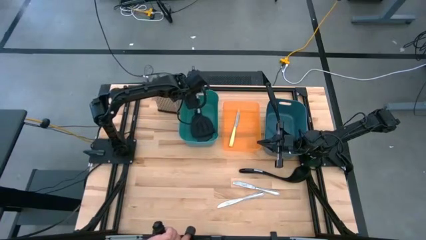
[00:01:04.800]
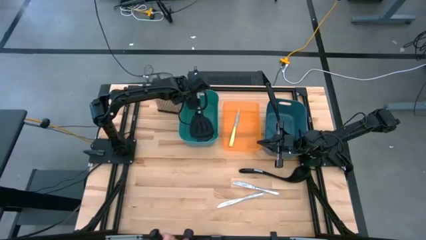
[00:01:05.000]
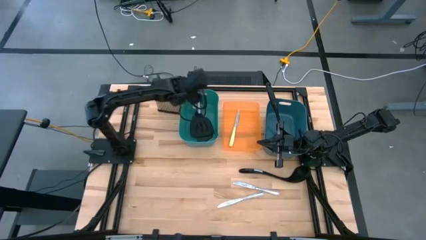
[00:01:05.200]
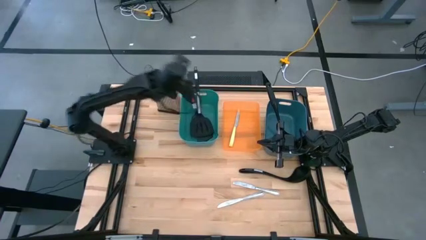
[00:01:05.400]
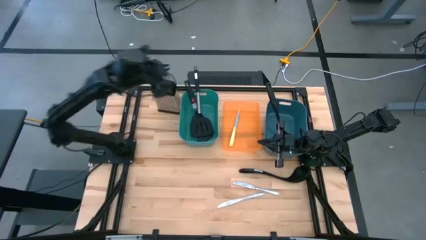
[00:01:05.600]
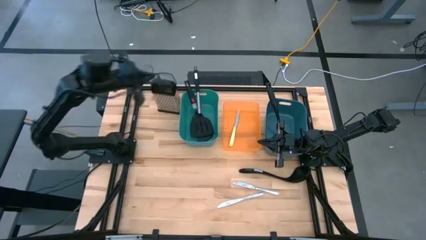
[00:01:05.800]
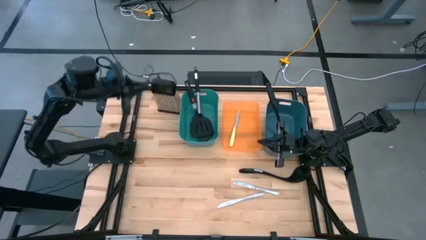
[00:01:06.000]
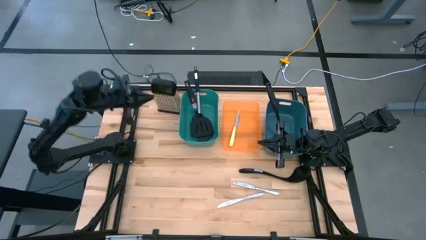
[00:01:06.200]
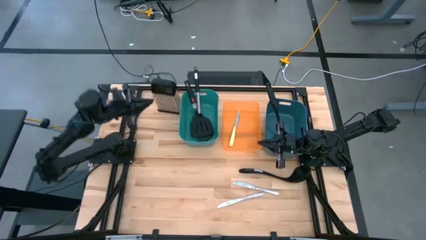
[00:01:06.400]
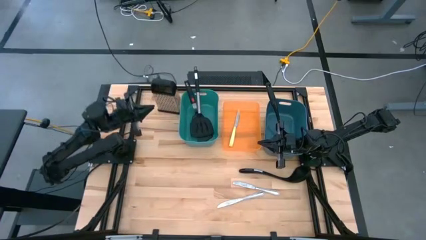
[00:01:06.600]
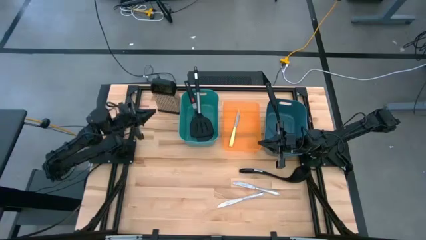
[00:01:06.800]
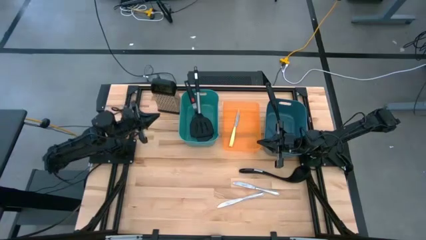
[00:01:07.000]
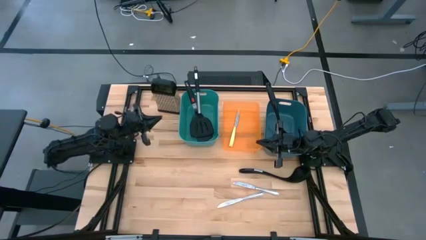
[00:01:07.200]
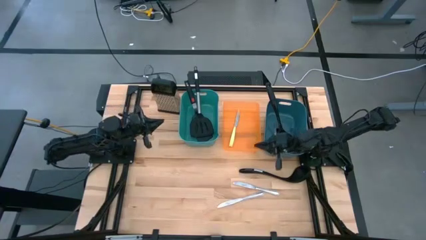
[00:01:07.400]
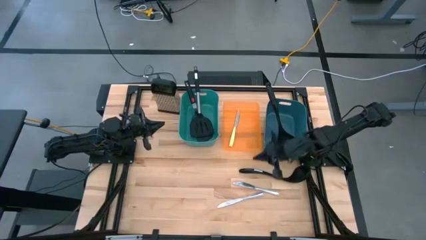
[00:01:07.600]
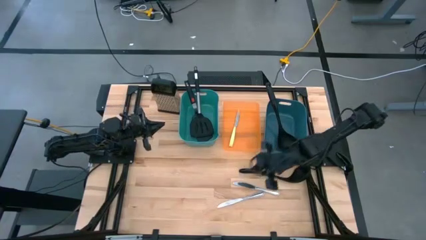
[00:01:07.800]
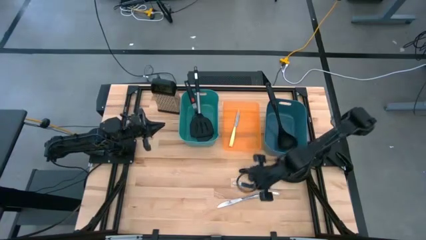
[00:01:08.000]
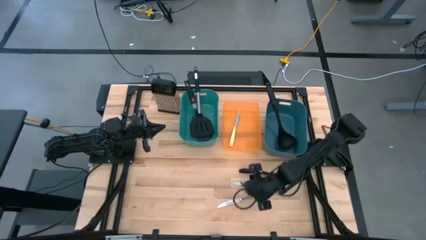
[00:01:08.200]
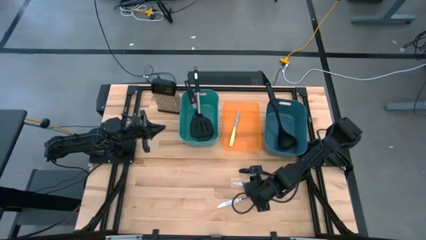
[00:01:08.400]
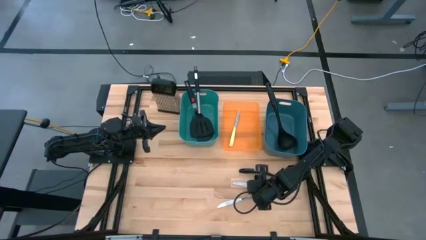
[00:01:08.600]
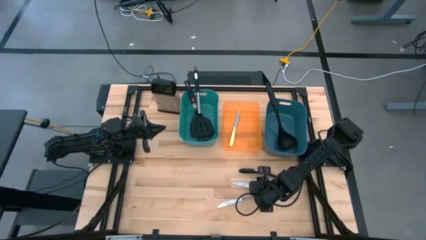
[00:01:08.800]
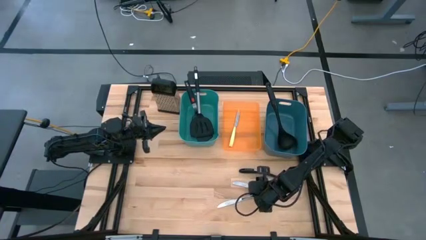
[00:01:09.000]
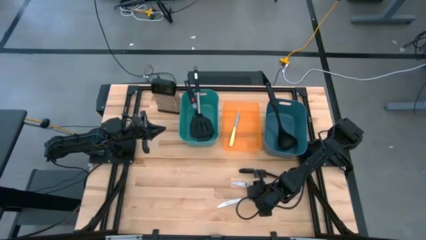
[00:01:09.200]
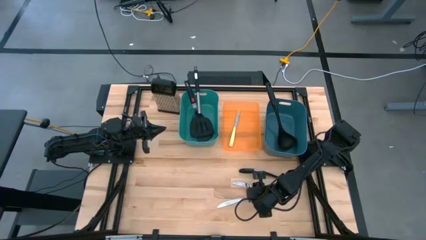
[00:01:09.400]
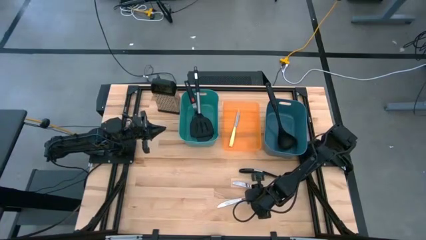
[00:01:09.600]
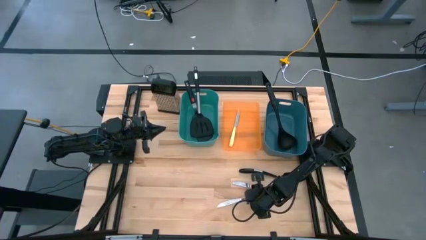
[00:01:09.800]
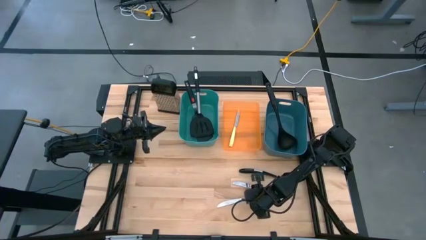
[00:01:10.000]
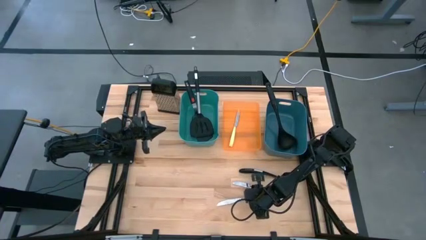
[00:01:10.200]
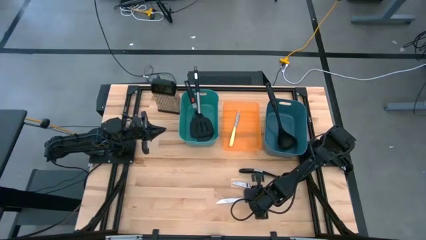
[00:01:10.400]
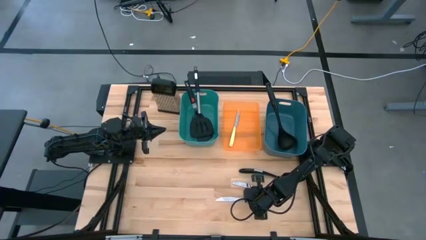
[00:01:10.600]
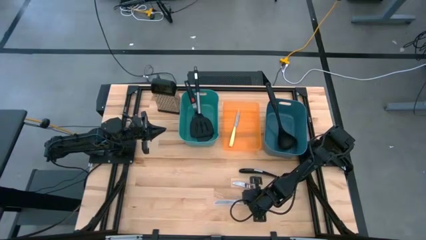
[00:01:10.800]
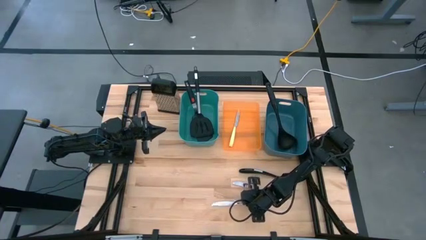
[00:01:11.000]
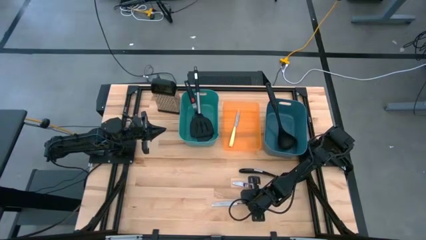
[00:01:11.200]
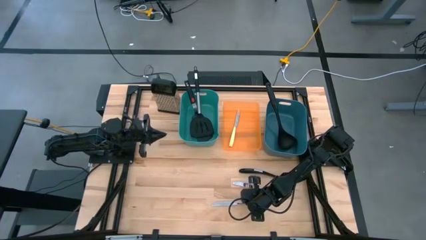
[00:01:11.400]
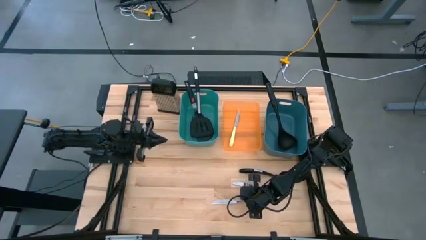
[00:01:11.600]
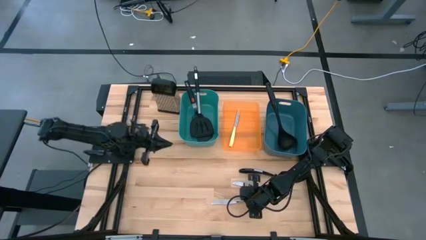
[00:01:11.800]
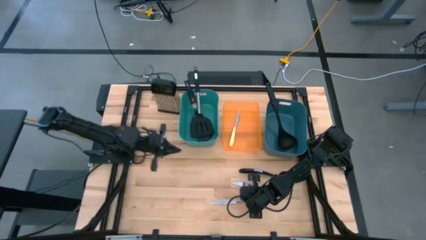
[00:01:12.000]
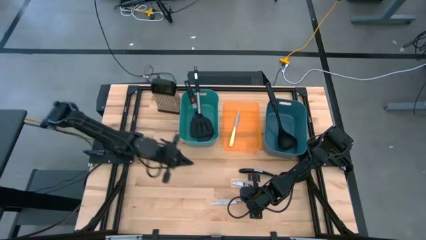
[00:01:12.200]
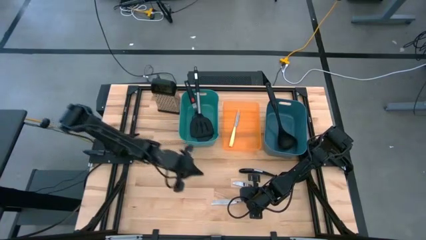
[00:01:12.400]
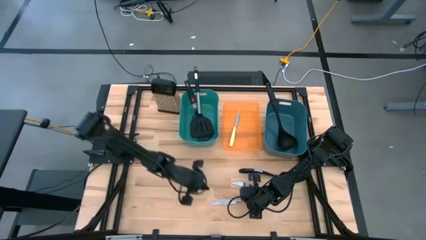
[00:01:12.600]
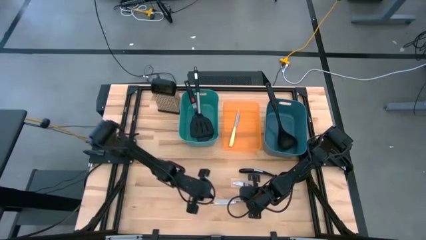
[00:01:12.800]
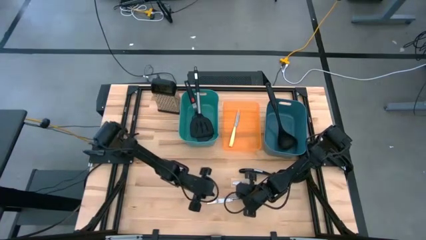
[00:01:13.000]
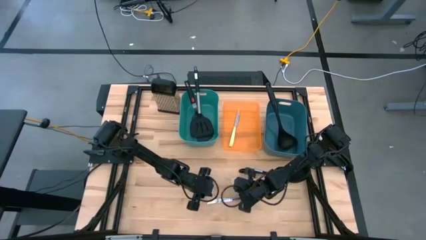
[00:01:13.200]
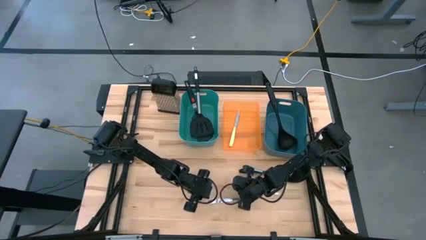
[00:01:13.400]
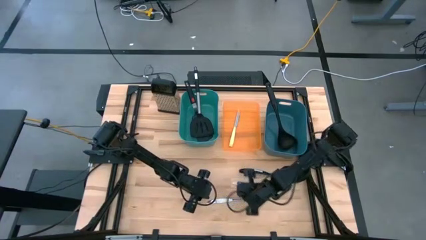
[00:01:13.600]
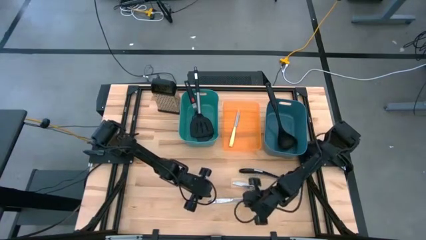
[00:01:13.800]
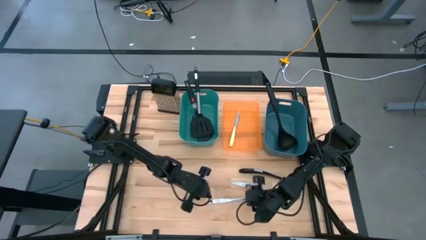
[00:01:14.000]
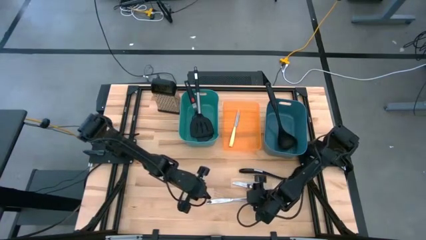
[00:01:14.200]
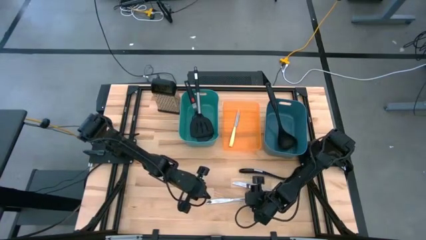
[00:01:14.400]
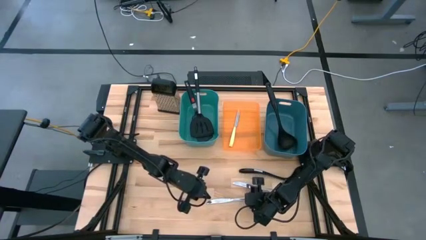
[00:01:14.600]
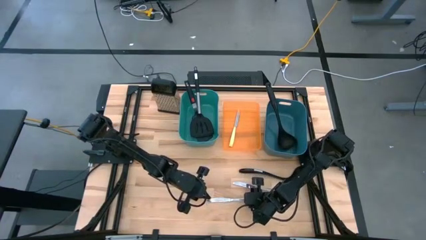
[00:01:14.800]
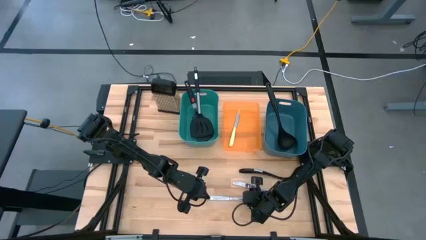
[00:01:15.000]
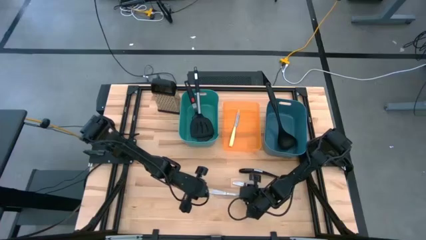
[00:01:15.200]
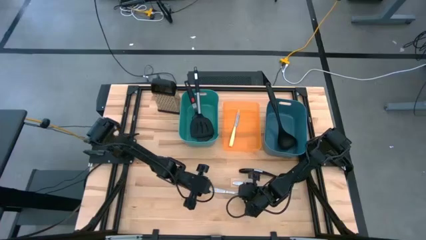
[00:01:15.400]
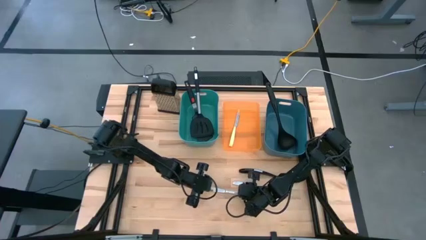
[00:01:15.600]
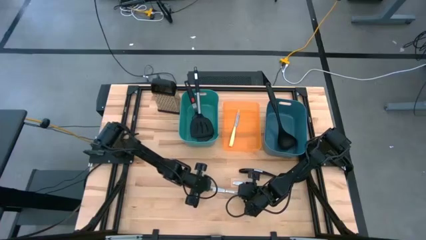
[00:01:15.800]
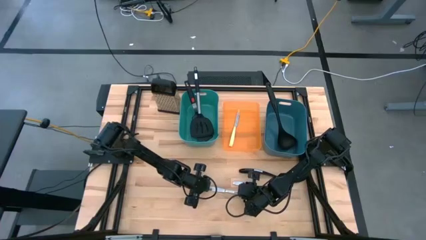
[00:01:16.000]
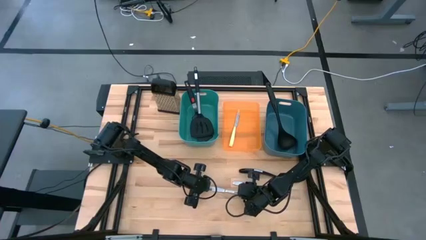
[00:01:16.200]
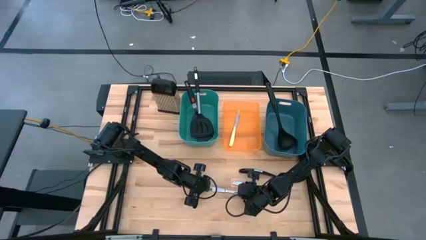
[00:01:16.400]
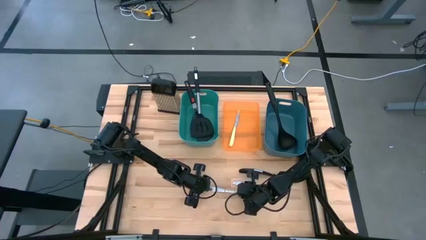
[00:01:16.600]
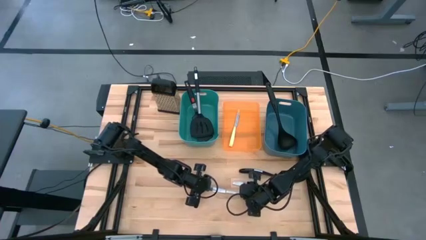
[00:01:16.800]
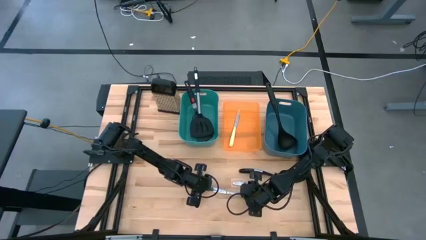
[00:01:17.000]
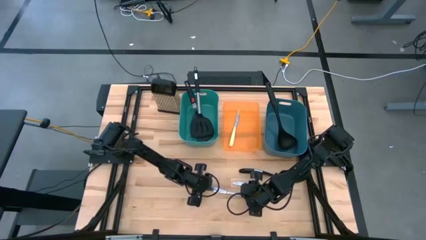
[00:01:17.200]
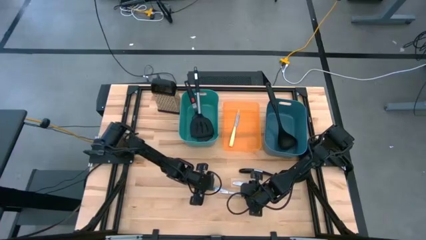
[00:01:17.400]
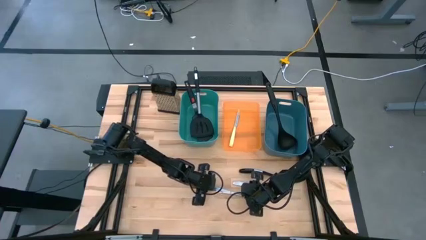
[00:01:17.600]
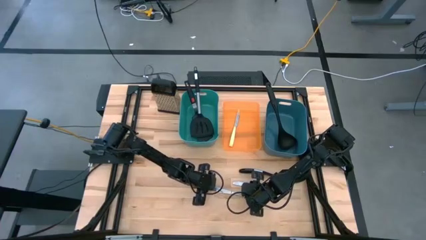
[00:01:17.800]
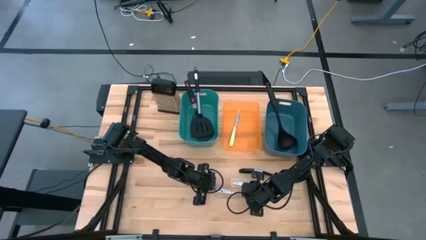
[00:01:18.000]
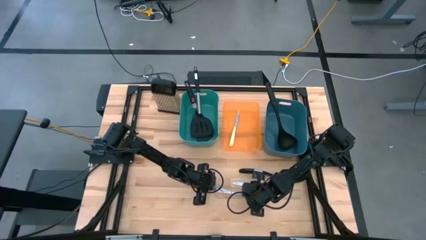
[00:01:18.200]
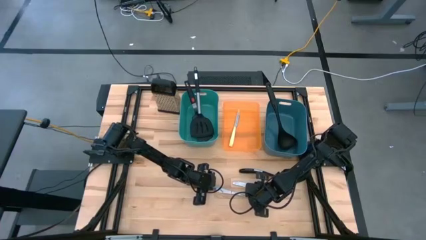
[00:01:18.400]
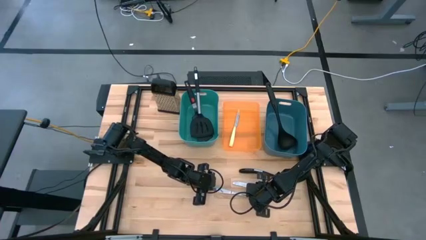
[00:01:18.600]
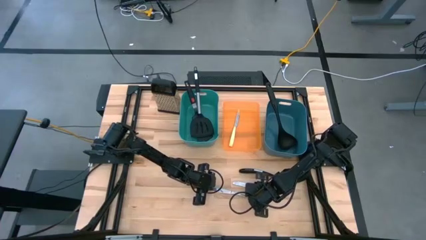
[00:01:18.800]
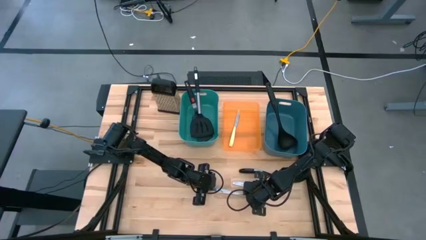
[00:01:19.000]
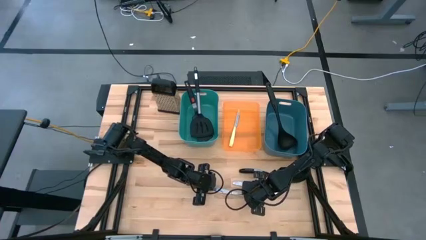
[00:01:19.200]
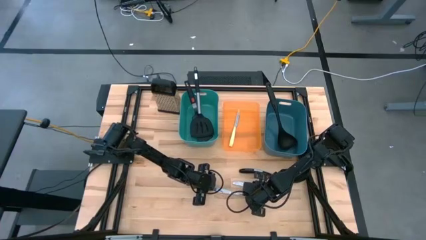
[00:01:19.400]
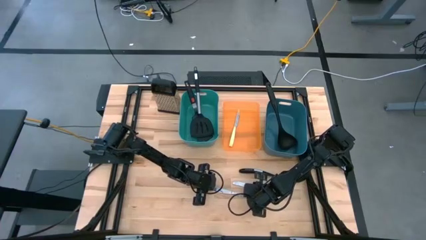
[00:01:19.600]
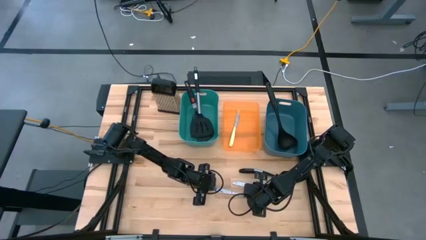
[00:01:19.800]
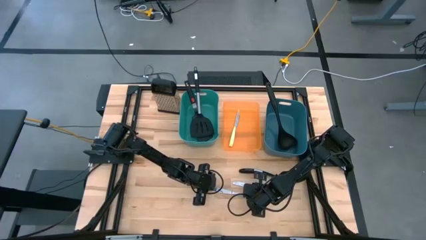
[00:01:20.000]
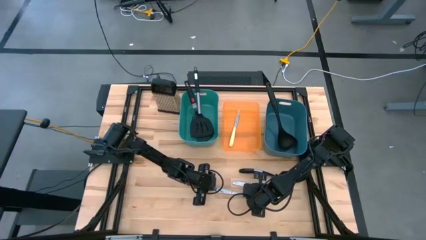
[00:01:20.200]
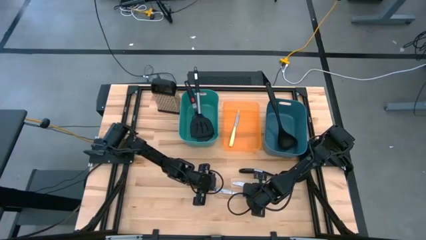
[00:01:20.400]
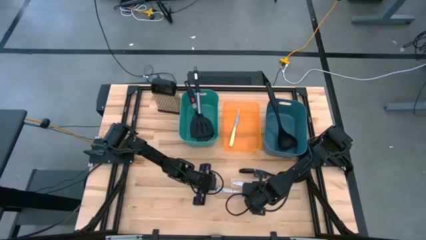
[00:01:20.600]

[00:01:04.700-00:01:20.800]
Task: Pick & Place Kitchen Items
Put the bottom silver table knife into the orange bin
